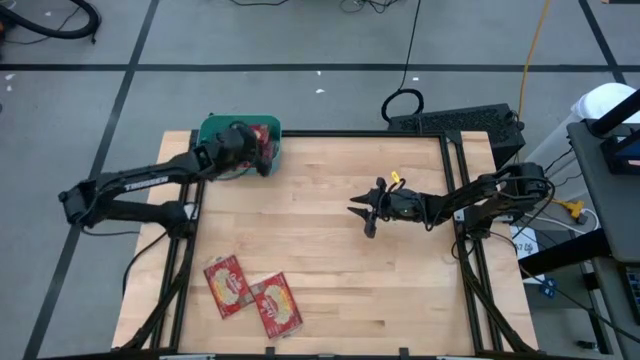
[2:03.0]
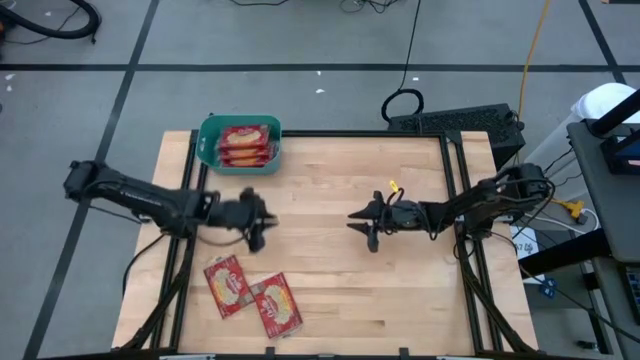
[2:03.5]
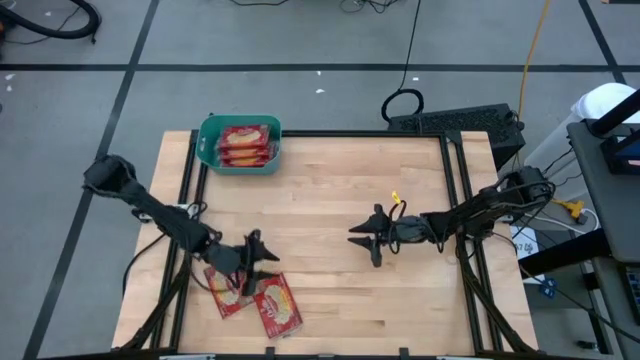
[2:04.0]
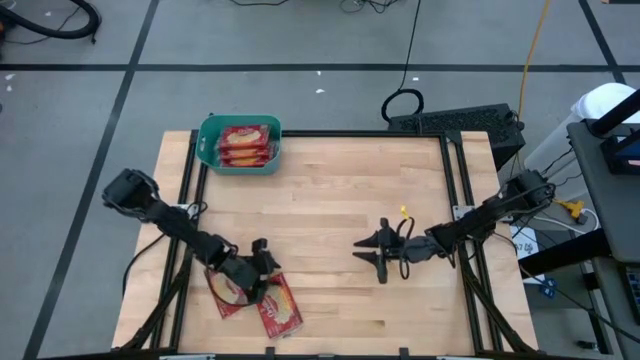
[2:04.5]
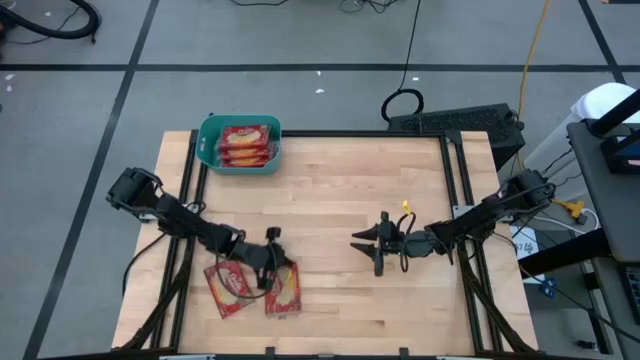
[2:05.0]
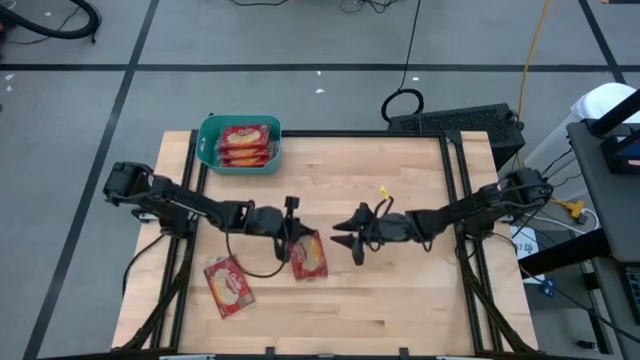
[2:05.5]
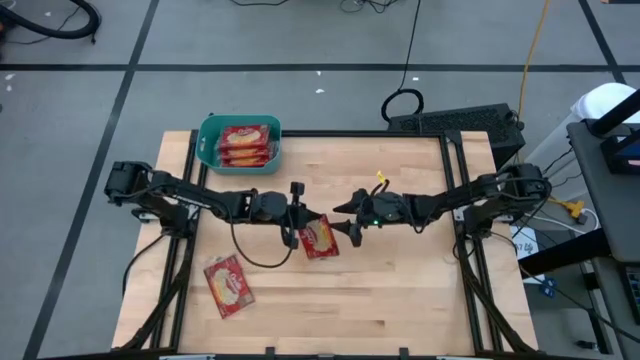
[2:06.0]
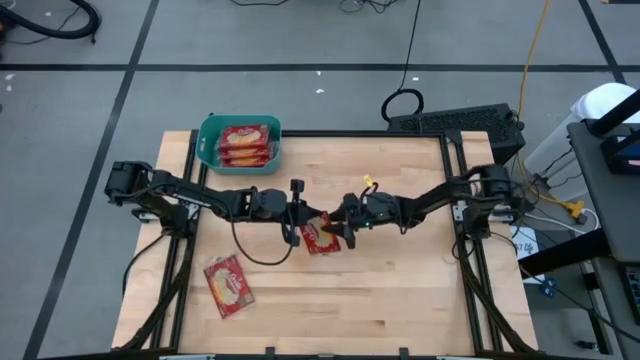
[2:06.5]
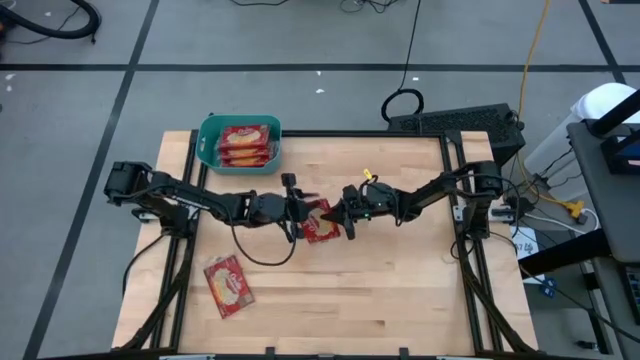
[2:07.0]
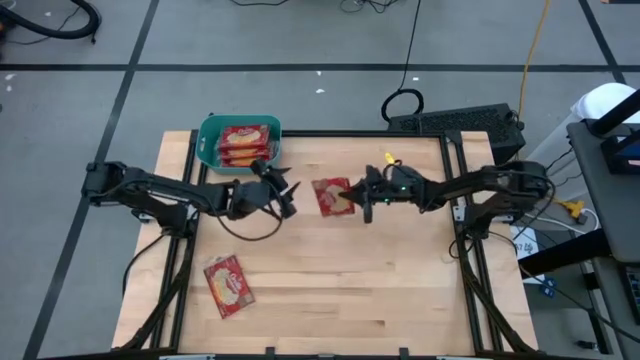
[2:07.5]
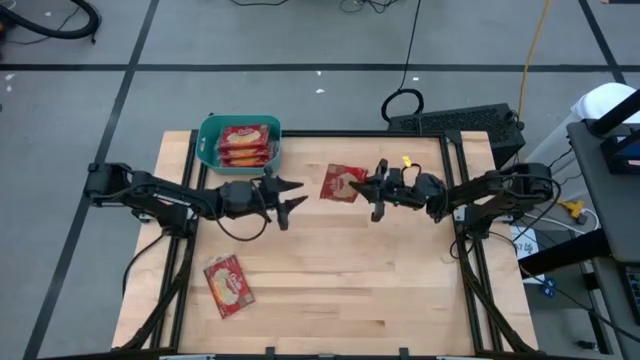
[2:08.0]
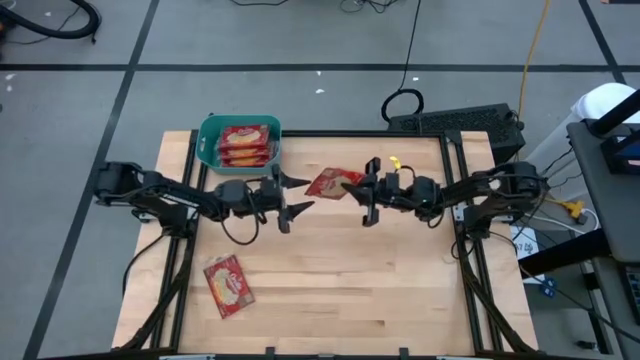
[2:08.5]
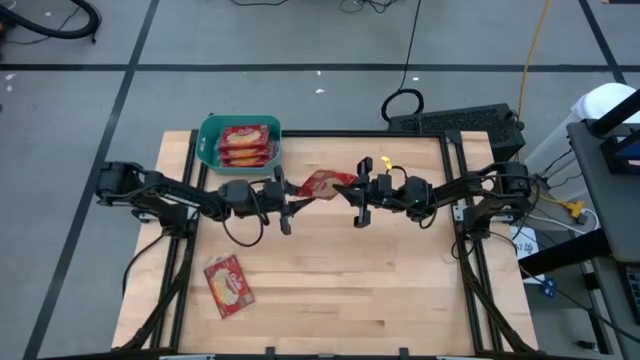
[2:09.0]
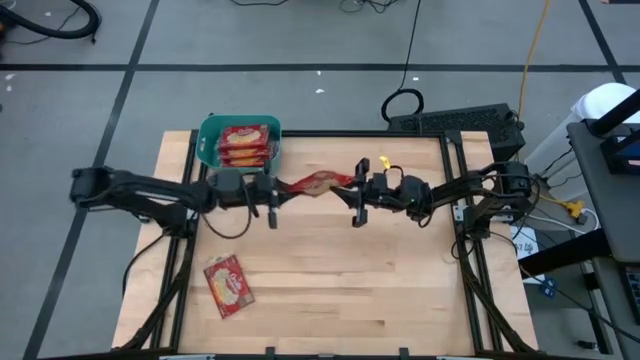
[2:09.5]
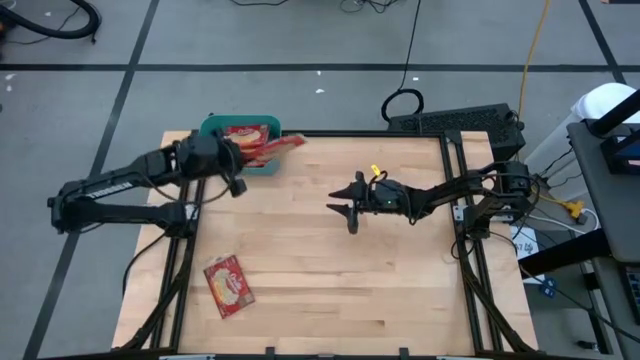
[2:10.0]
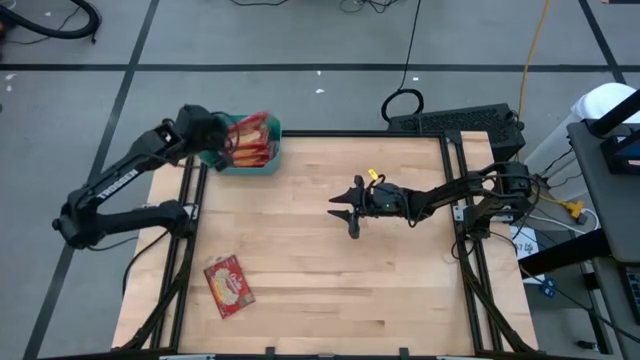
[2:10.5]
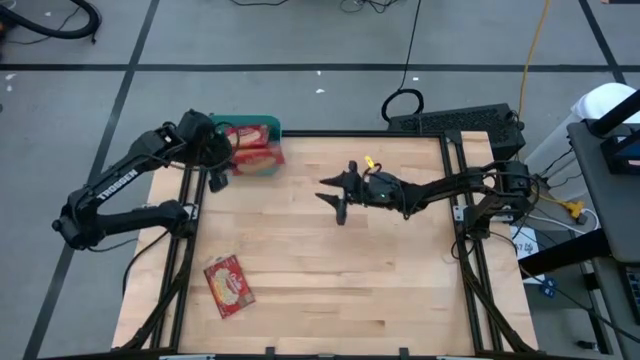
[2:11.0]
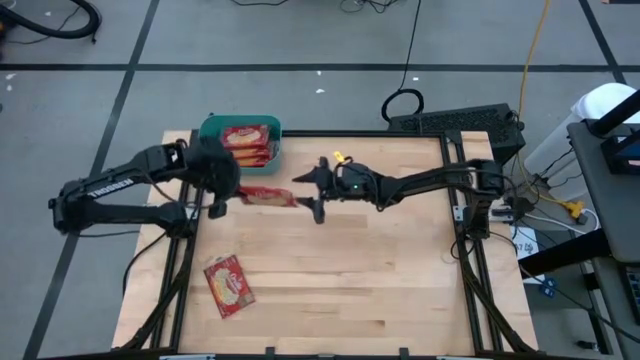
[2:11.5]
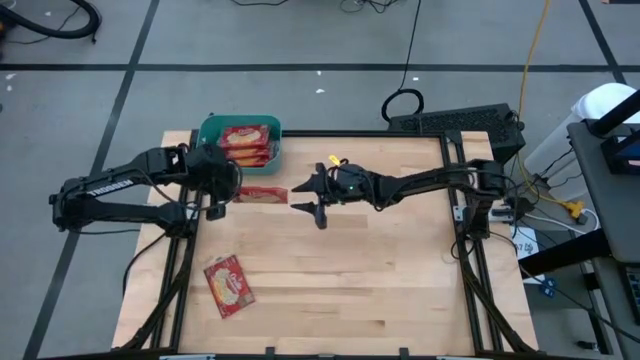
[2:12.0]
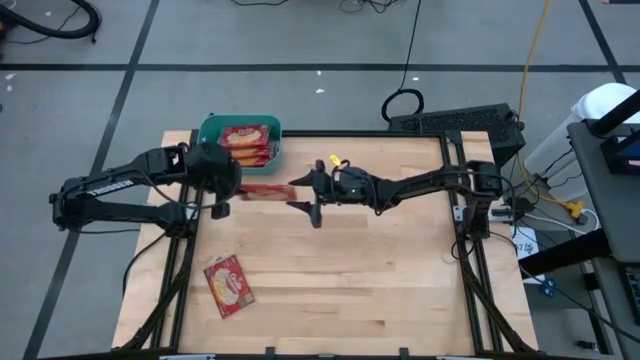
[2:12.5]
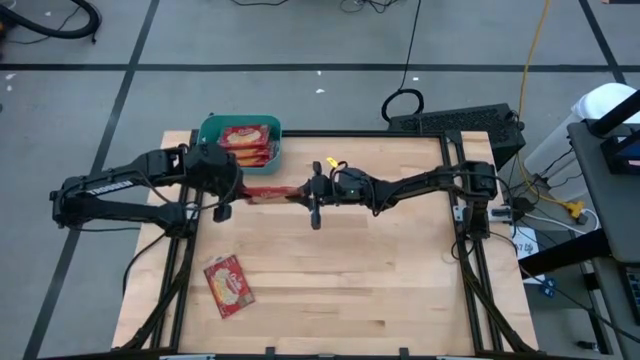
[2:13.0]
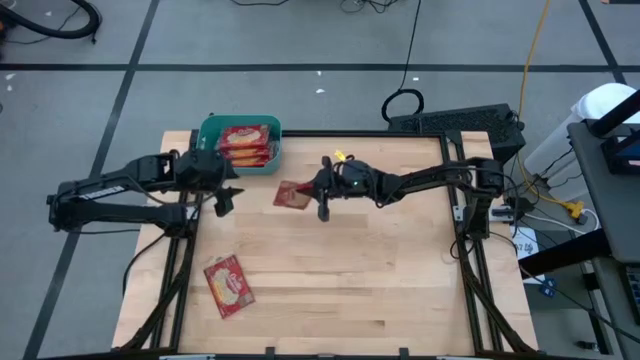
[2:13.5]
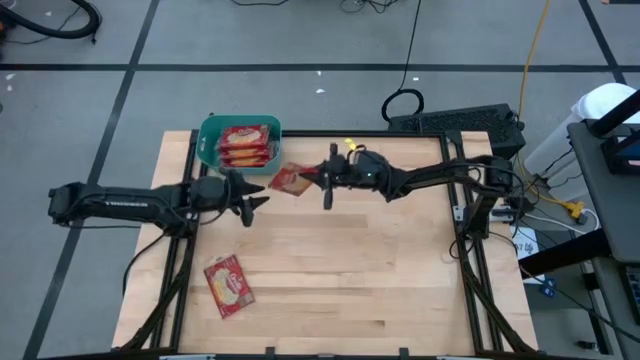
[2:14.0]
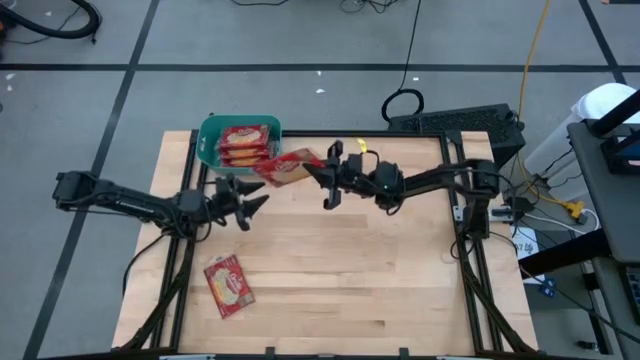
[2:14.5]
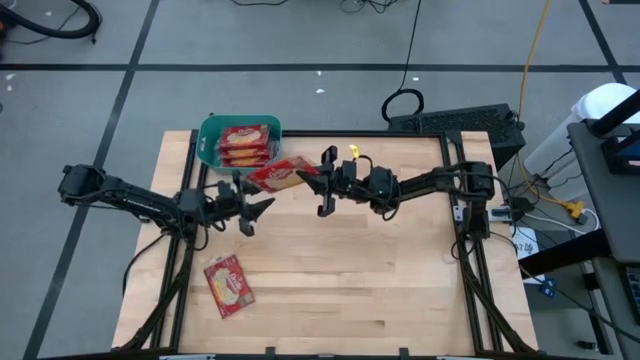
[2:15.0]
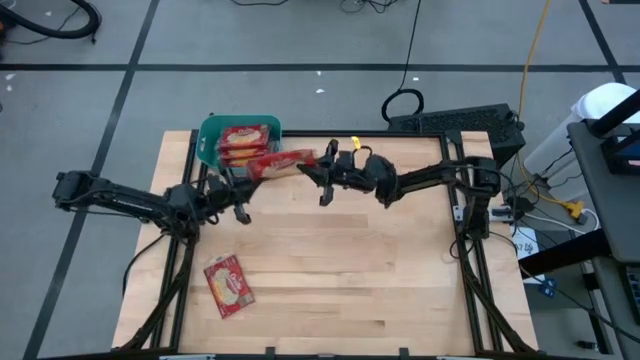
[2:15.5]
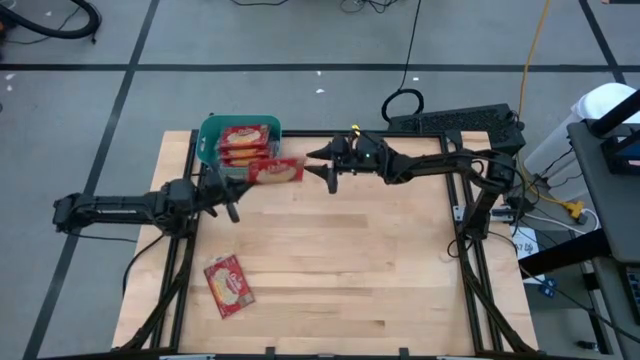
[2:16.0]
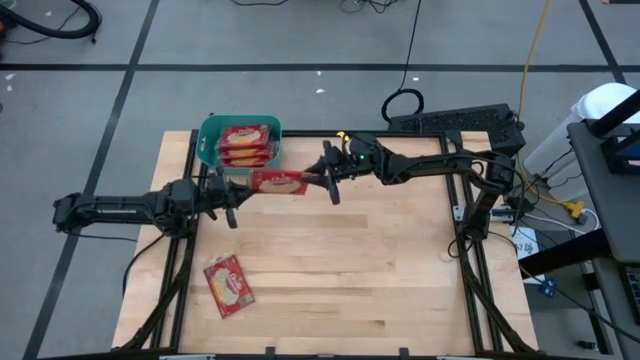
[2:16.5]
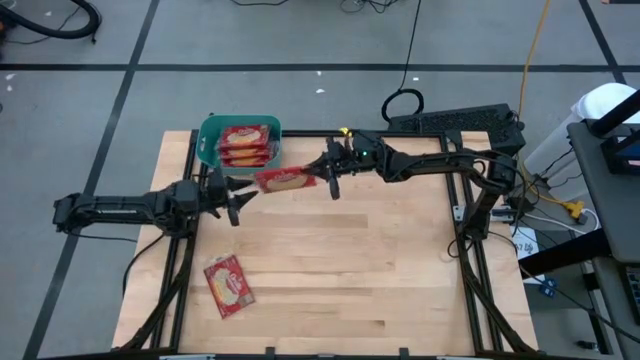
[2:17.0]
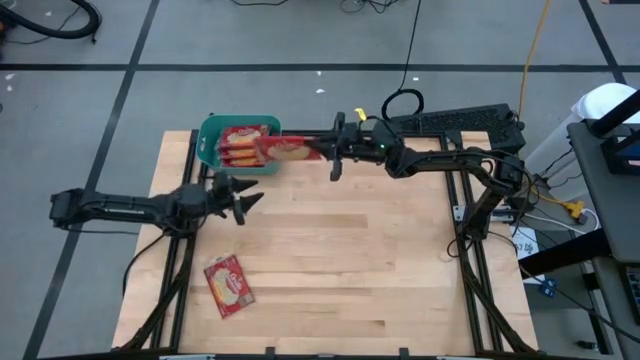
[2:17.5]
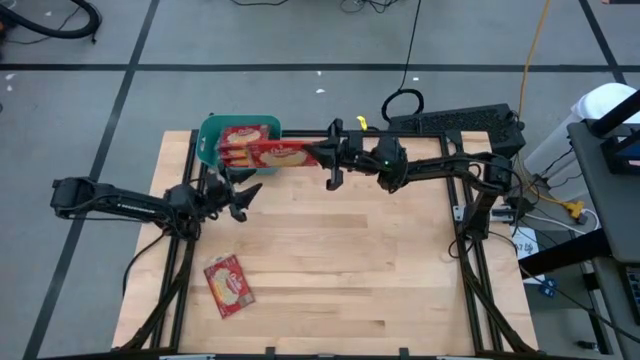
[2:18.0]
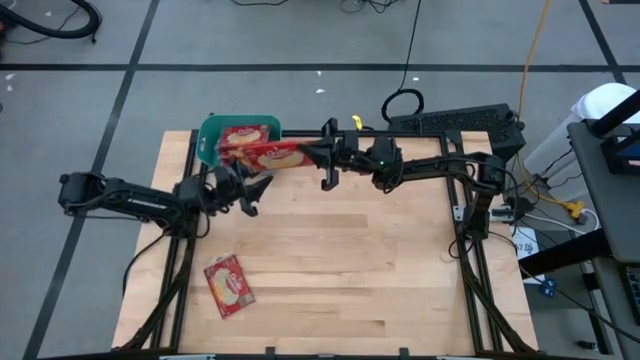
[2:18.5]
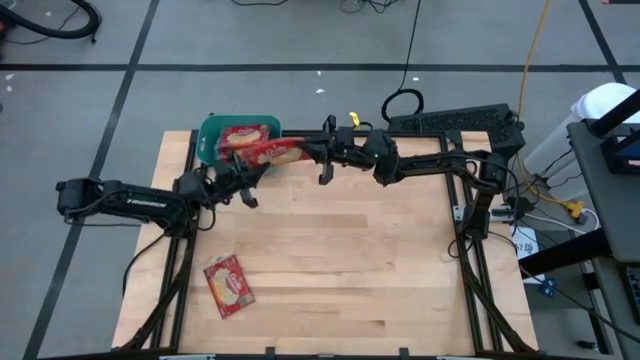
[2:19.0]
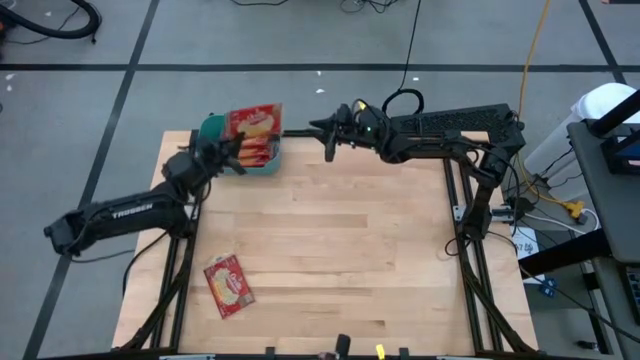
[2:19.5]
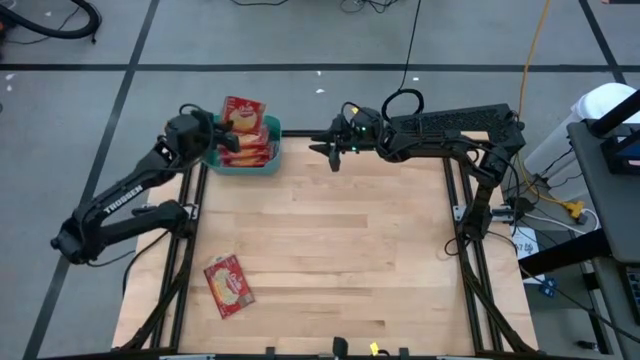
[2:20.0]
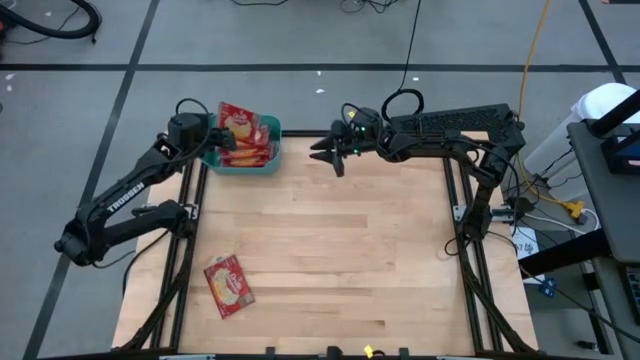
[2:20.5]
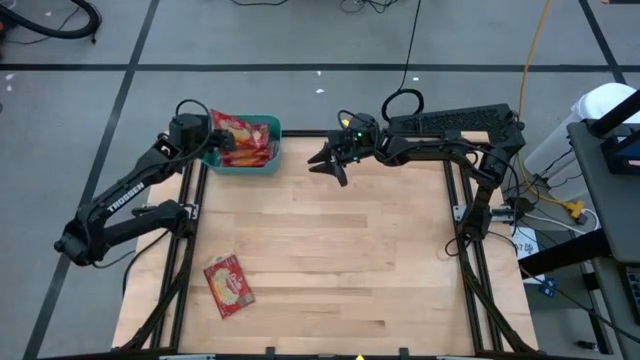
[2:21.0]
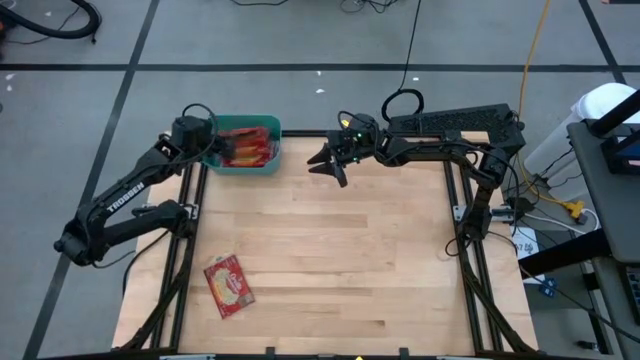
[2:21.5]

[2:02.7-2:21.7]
Task: Sort popcorn bags into baskets
Put the red popcorn bag into the green bin

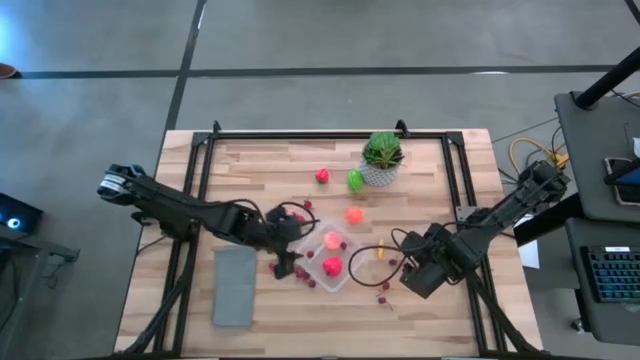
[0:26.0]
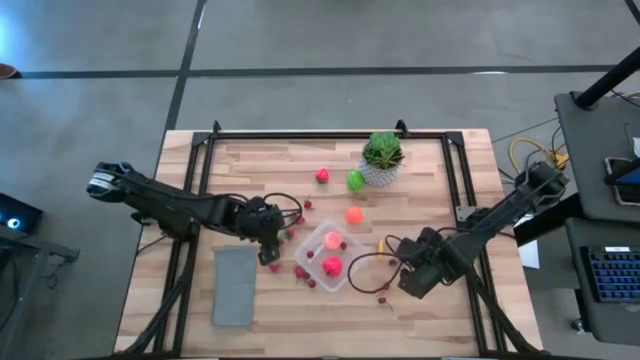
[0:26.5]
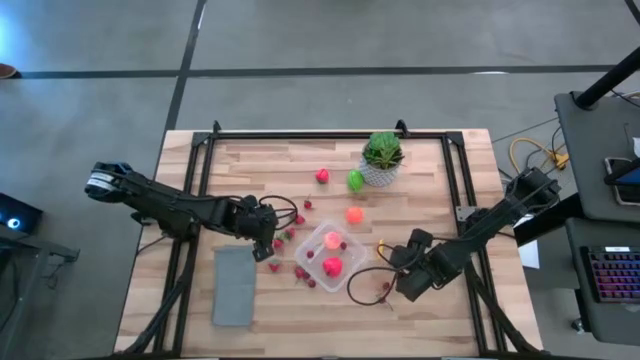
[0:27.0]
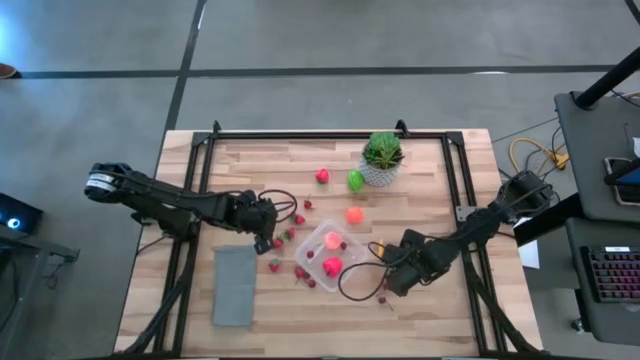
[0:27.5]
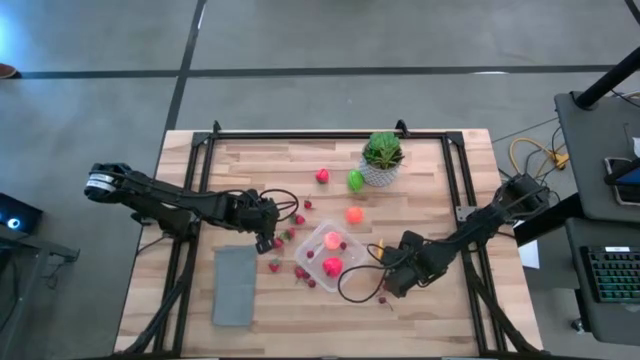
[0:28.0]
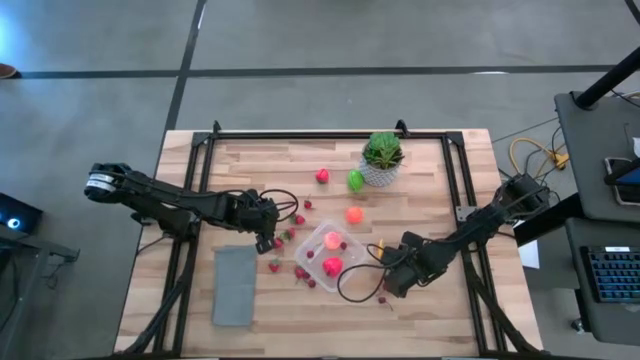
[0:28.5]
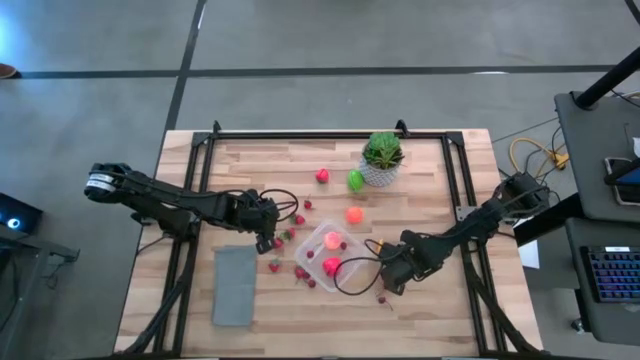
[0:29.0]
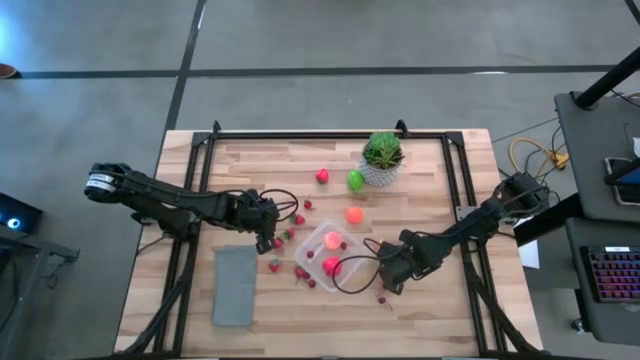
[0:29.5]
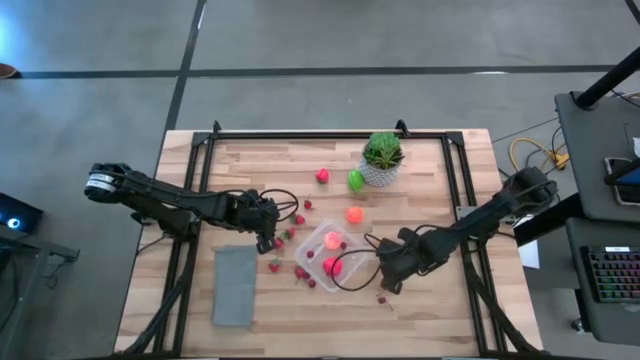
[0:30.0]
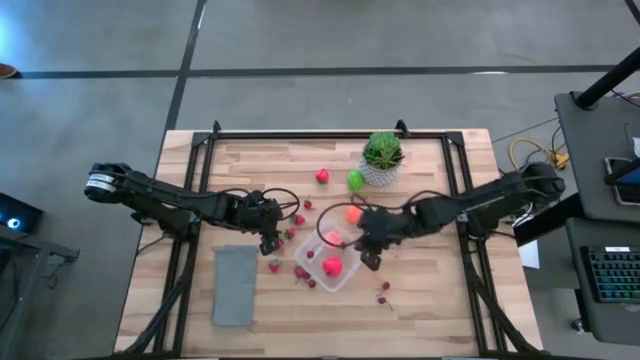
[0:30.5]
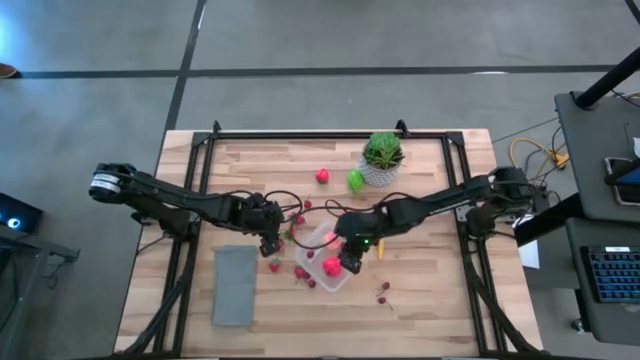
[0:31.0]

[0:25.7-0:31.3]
Task: Pick and placing Produce into tupperware
Put the red cherry into the transparent bin
